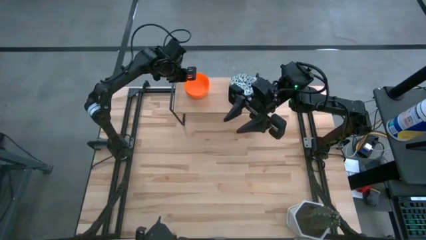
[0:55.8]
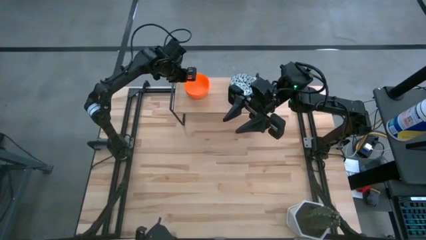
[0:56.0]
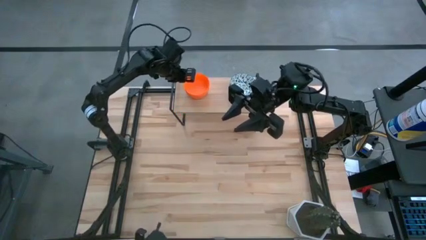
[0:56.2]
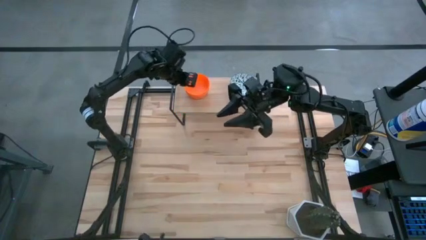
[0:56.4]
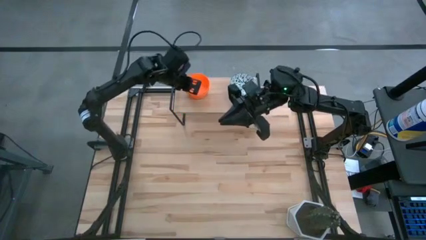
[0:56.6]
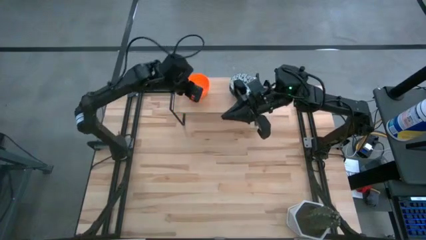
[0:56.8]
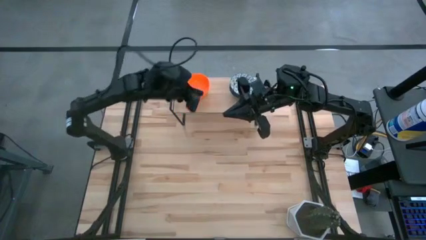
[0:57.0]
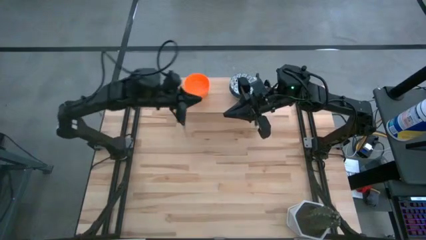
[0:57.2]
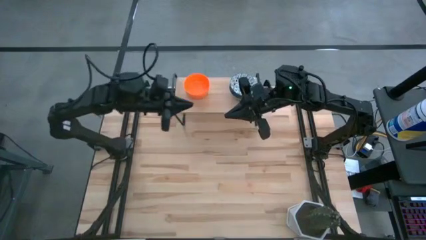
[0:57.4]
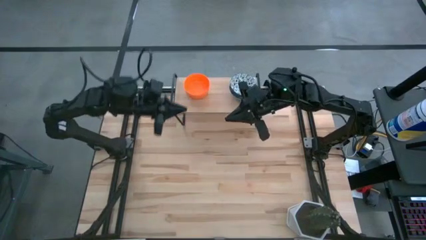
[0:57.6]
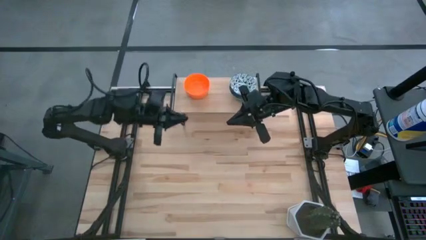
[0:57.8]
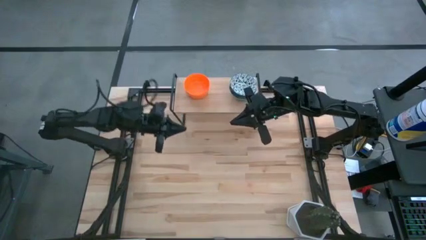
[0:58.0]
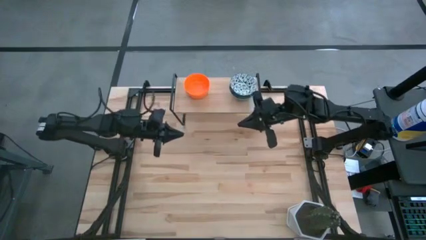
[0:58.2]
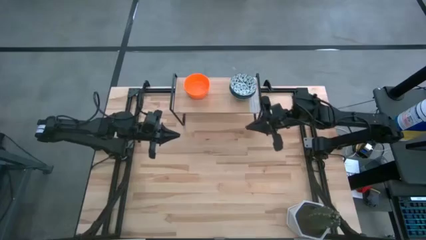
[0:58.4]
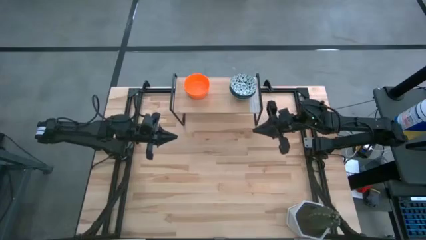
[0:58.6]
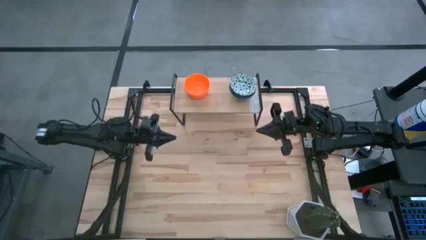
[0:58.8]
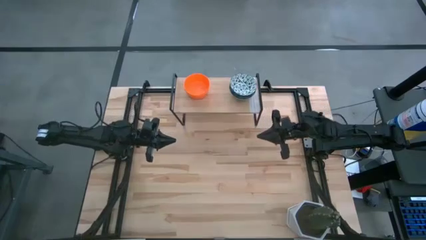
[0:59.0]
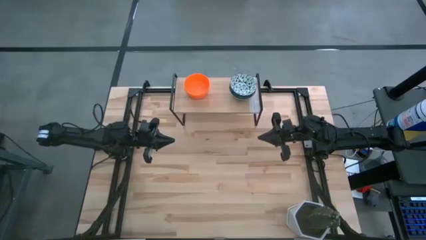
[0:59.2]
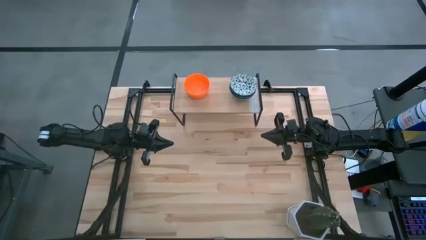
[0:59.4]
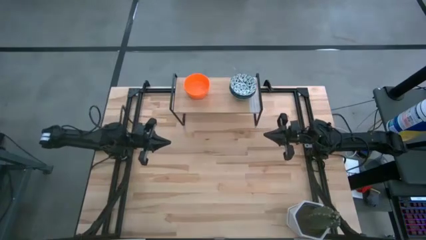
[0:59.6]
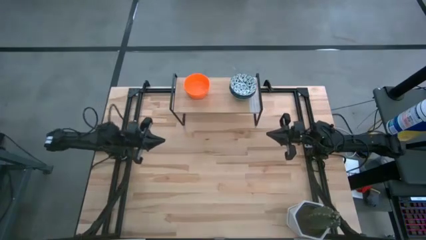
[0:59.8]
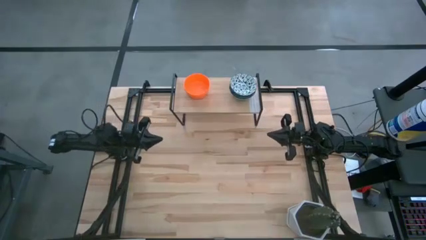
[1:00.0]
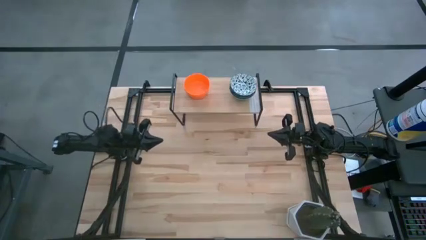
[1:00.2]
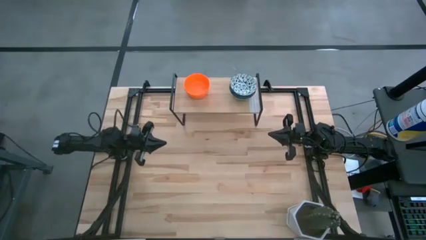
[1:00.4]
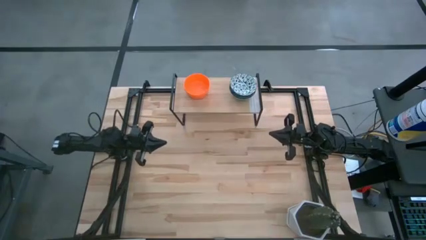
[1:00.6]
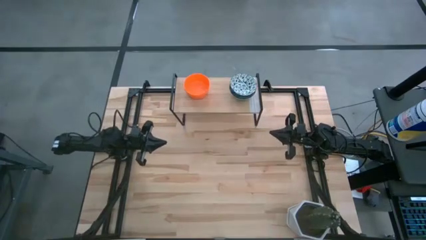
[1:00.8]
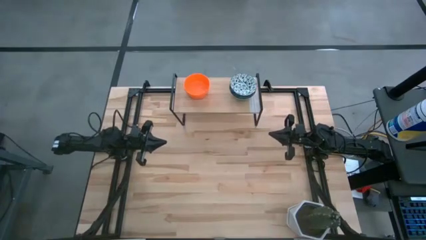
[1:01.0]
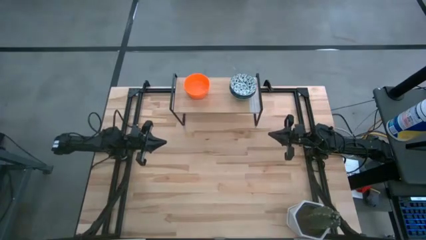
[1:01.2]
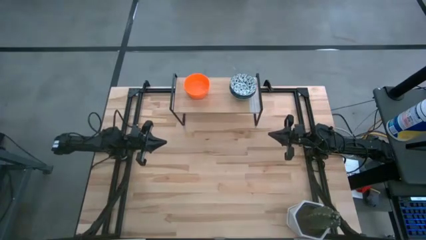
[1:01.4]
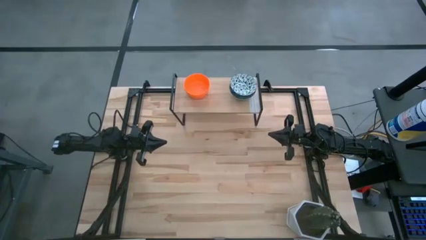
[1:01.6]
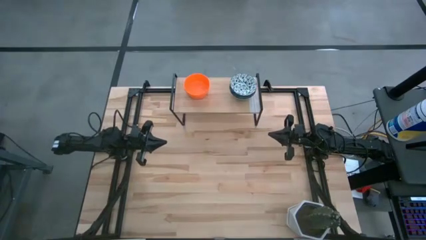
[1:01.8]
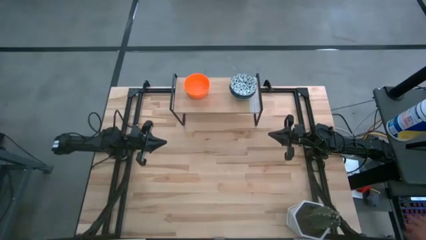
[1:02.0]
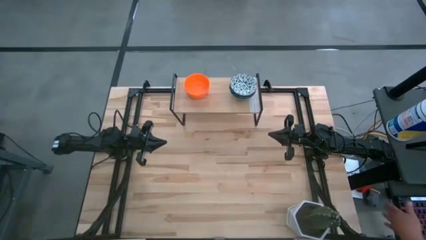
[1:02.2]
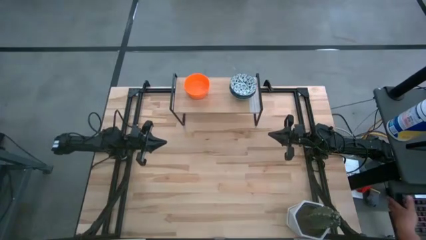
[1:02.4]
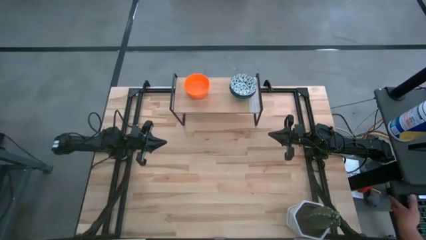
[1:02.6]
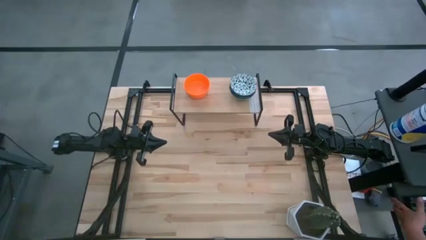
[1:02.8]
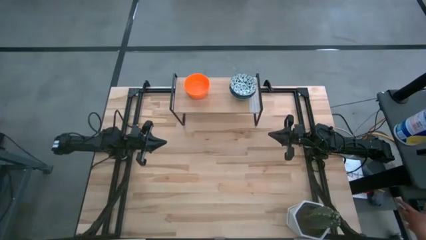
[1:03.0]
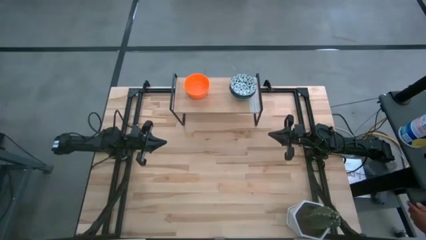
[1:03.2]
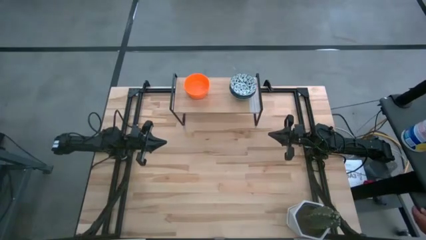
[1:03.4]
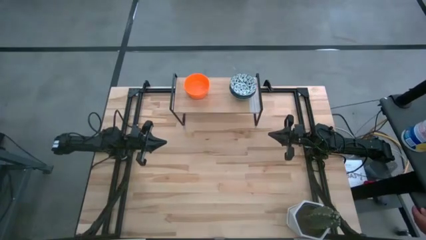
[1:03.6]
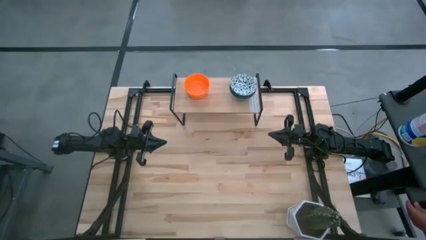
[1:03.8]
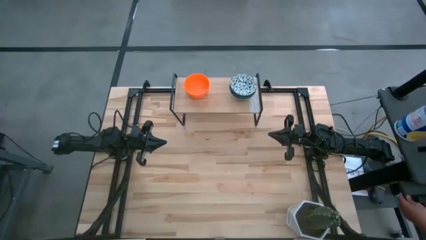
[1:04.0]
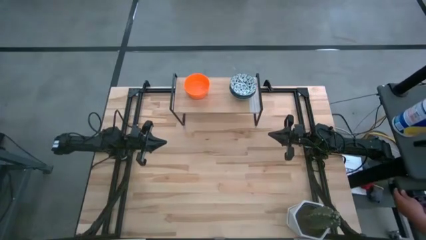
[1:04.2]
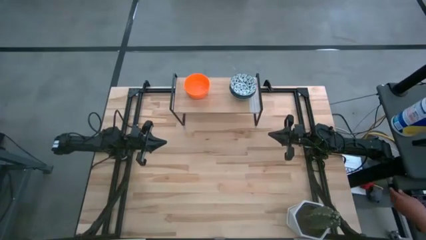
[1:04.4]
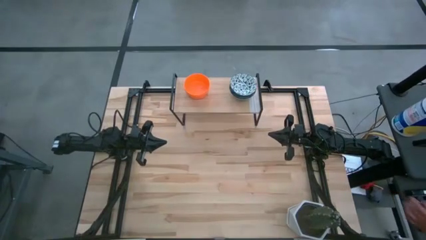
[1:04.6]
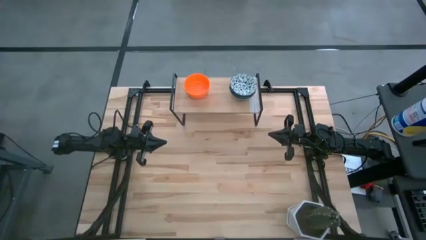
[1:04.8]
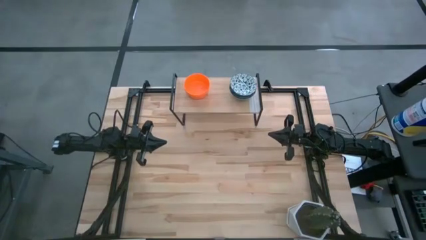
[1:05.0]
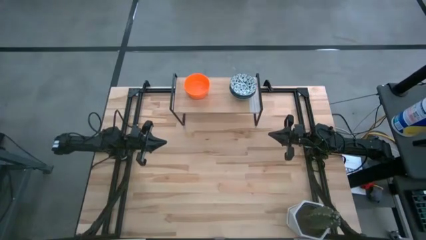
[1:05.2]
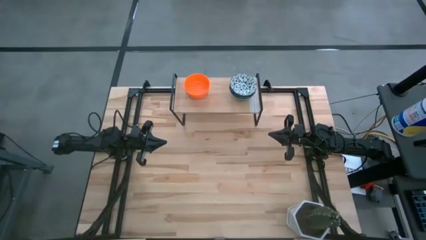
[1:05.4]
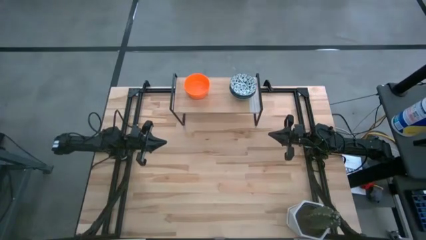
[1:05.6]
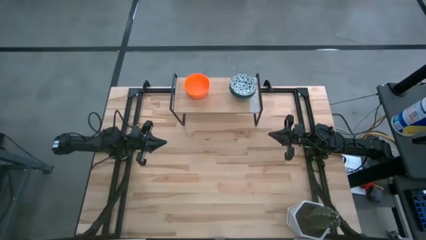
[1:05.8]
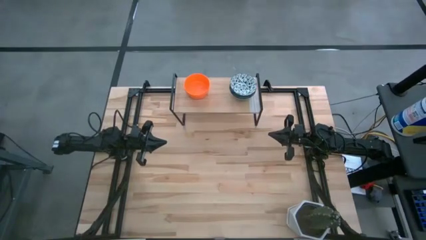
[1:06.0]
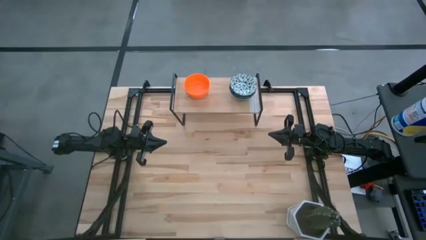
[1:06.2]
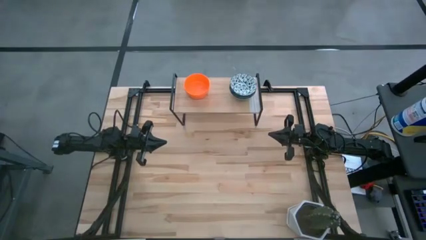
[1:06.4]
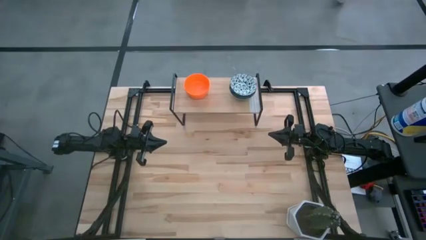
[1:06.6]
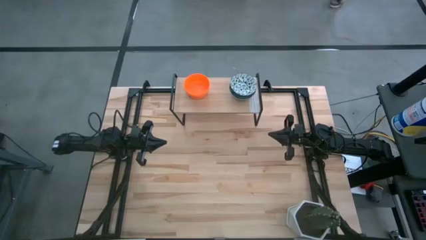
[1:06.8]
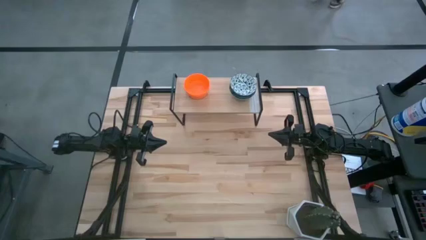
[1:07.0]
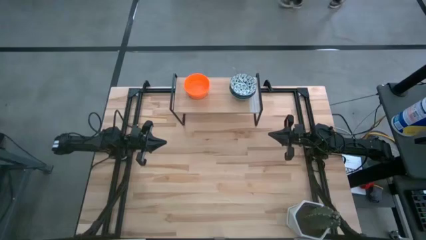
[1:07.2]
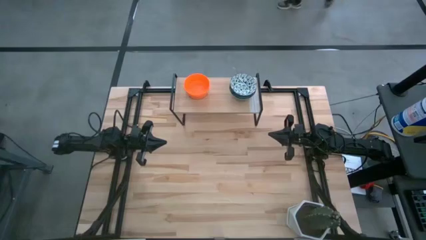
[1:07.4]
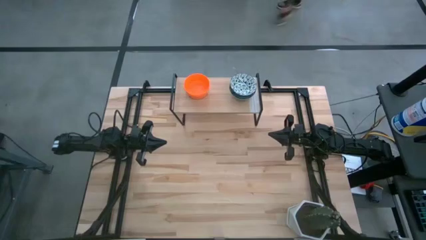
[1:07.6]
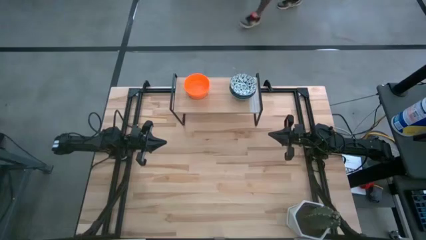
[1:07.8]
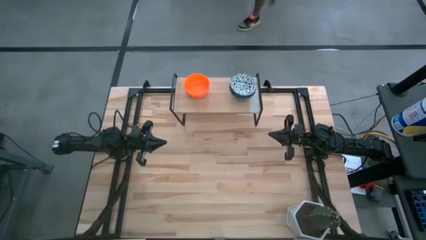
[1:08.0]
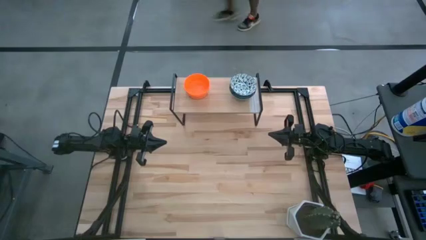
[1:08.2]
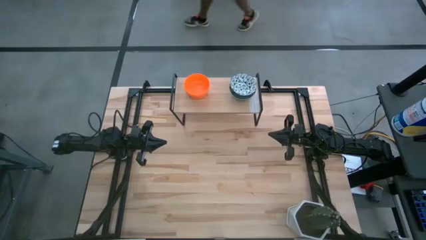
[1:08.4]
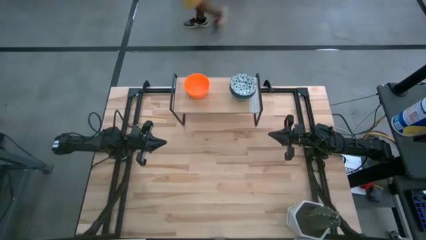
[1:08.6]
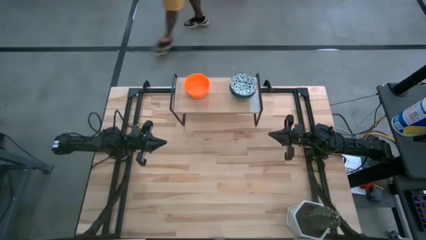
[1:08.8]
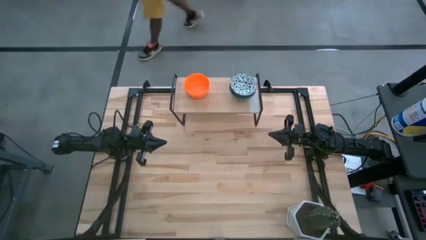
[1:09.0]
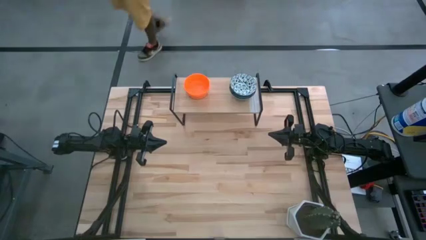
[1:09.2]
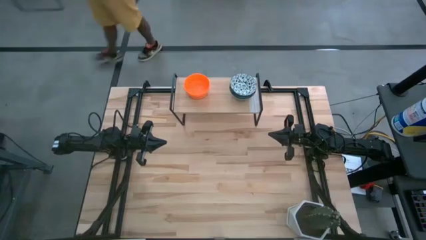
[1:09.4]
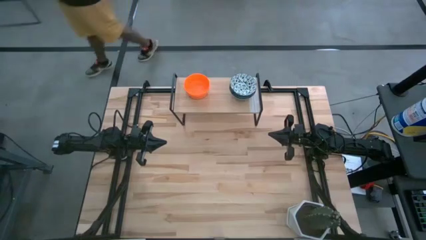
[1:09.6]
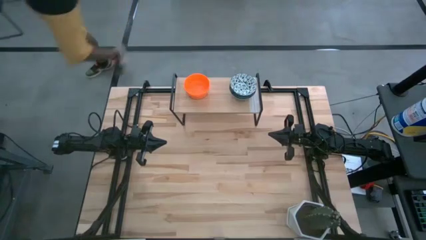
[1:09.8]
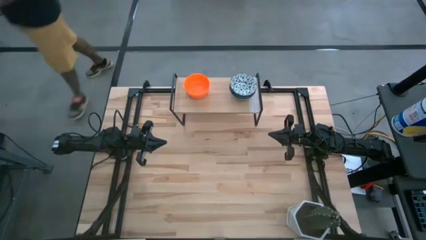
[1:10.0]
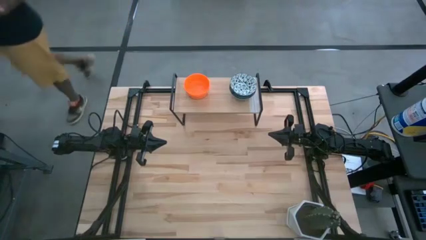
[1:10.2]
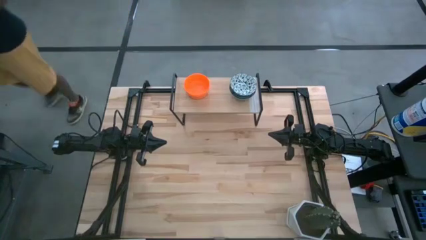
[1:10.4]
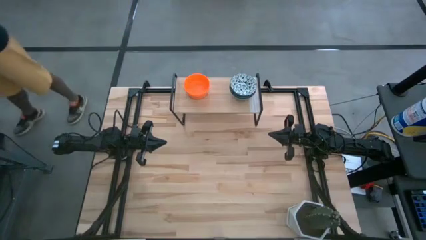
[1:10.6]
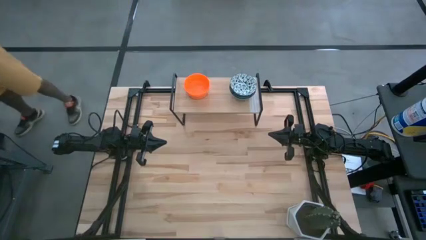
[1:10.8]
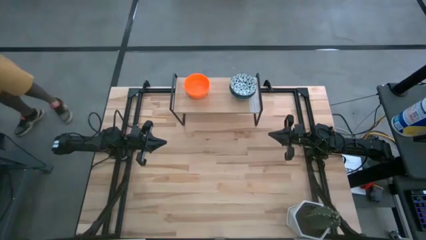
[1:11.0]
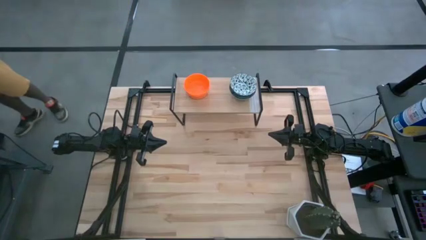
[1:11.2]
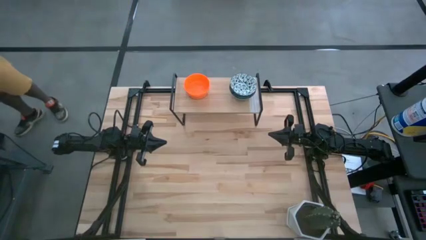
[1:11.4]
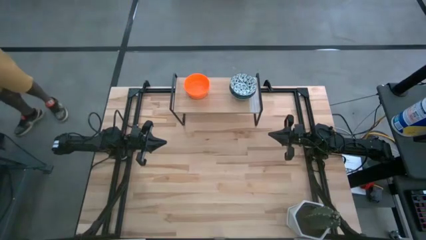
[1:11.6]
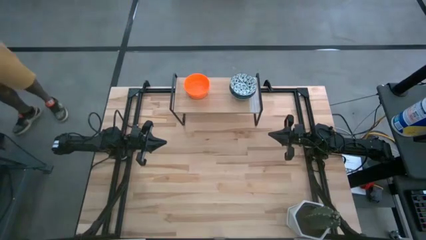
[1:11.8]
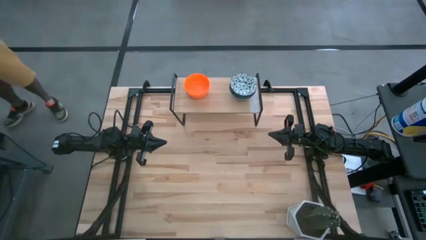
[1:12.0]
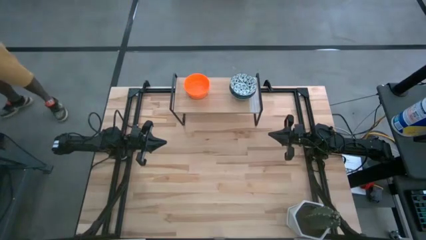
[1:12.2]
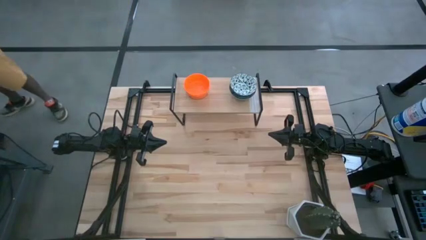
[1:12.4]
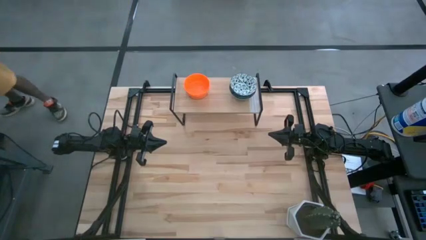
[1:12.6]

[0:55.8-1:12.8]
Task: Pick & Place Mini bowls
Return to Home Position
